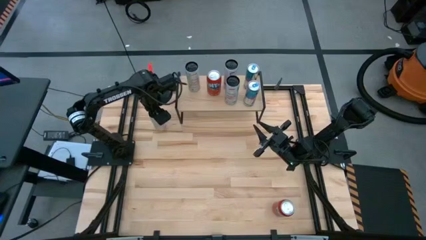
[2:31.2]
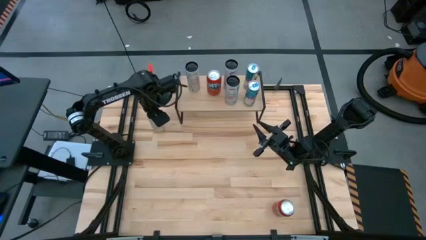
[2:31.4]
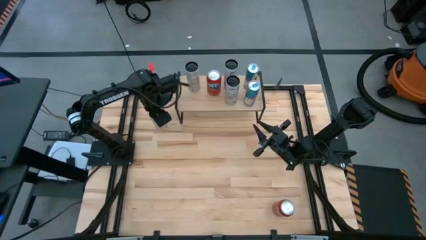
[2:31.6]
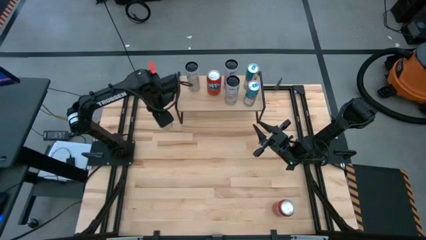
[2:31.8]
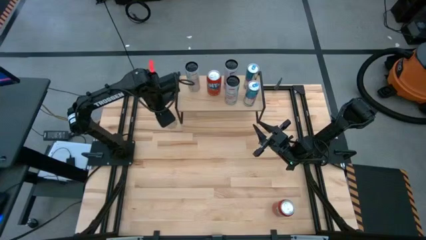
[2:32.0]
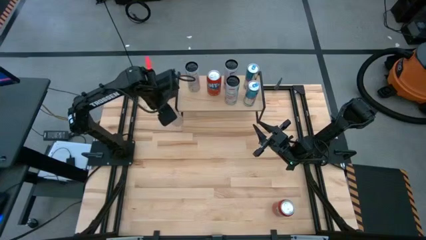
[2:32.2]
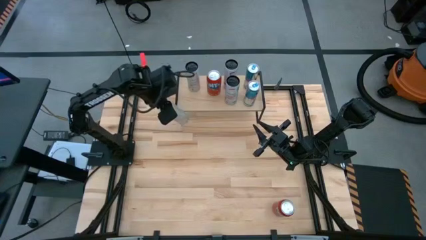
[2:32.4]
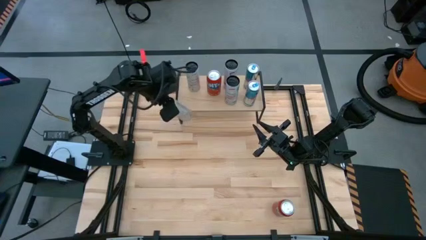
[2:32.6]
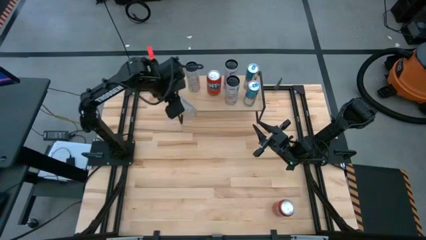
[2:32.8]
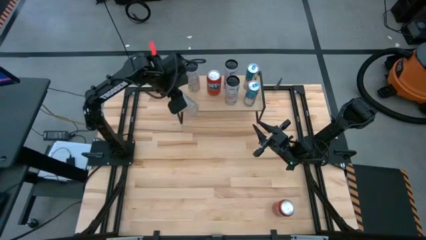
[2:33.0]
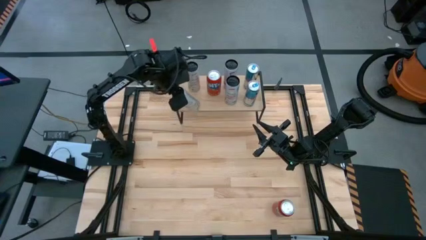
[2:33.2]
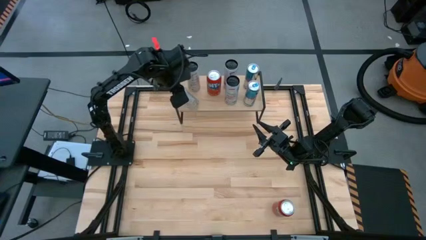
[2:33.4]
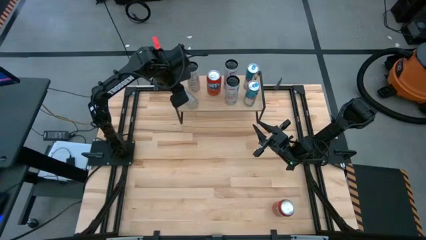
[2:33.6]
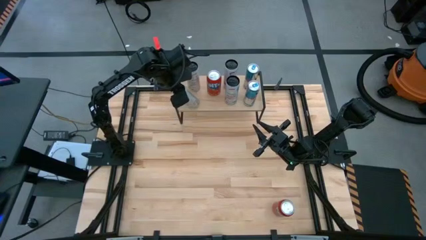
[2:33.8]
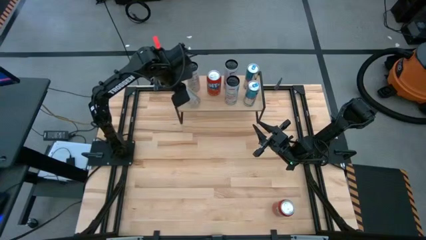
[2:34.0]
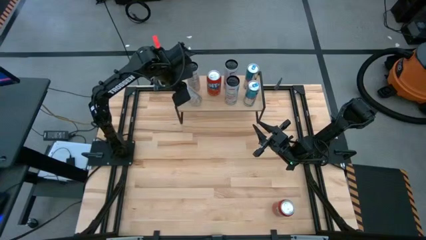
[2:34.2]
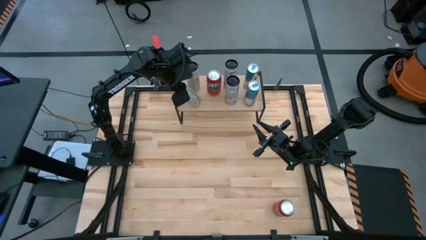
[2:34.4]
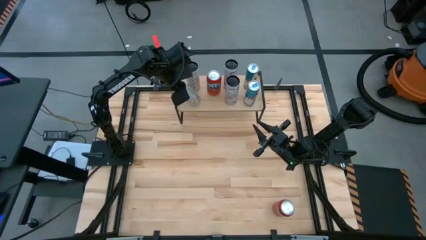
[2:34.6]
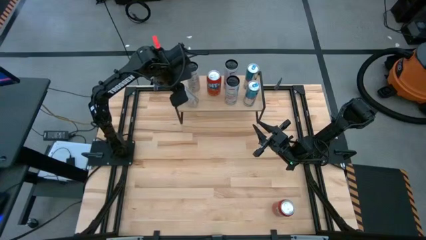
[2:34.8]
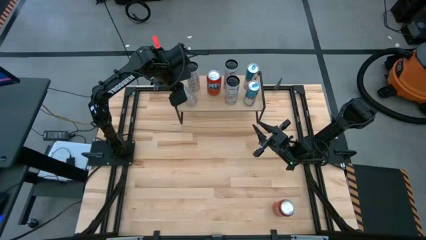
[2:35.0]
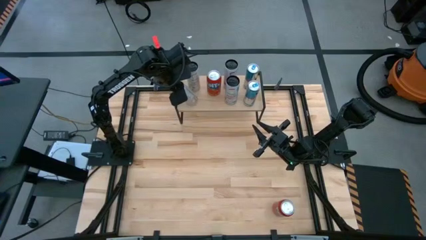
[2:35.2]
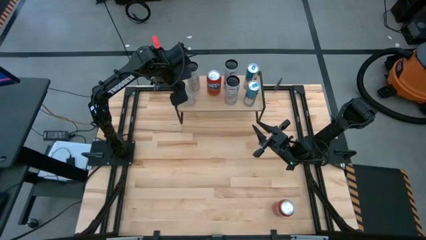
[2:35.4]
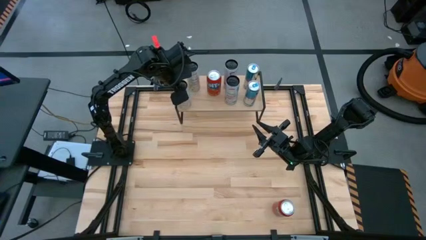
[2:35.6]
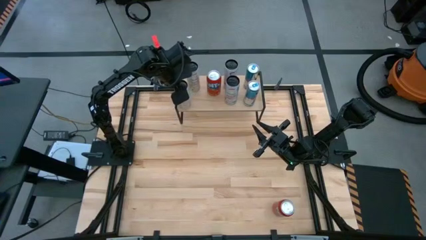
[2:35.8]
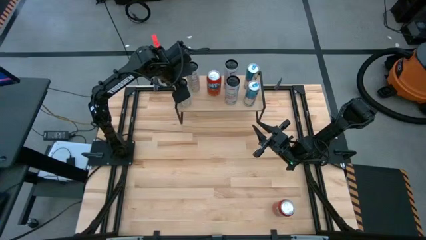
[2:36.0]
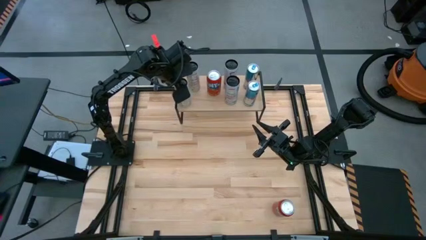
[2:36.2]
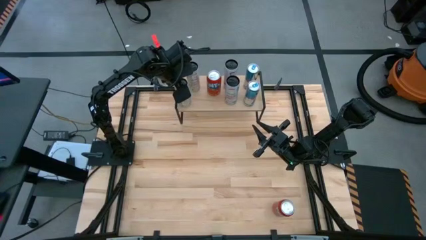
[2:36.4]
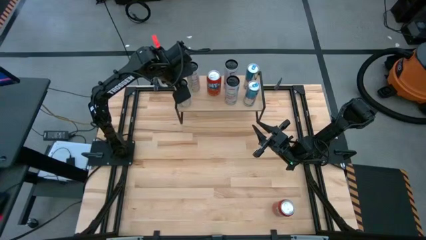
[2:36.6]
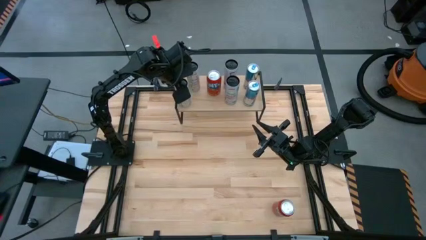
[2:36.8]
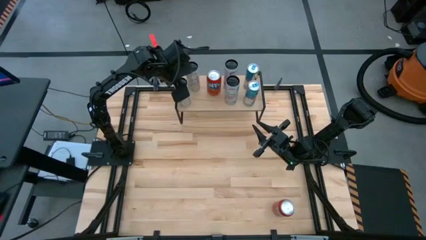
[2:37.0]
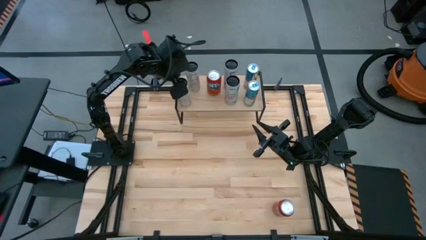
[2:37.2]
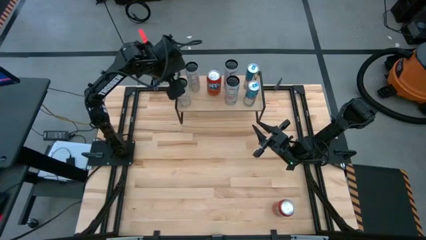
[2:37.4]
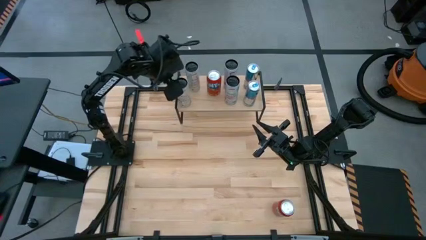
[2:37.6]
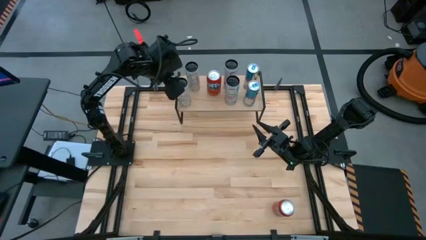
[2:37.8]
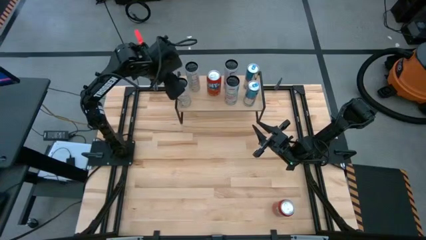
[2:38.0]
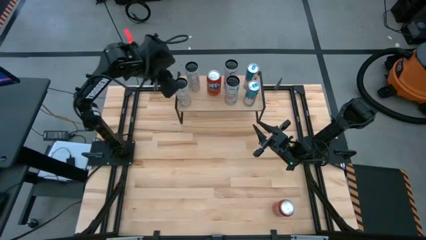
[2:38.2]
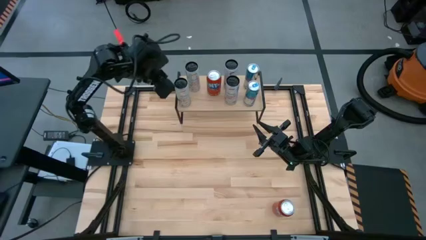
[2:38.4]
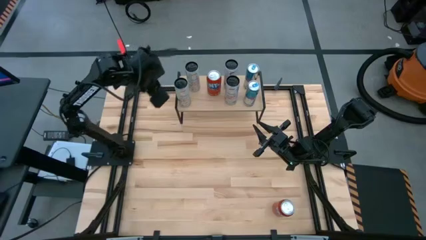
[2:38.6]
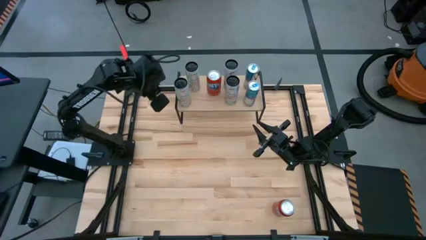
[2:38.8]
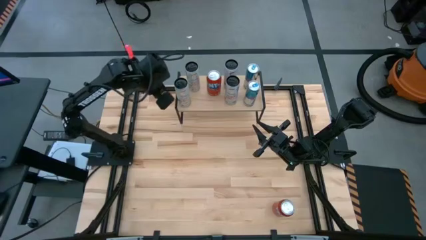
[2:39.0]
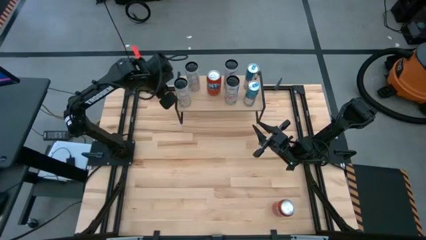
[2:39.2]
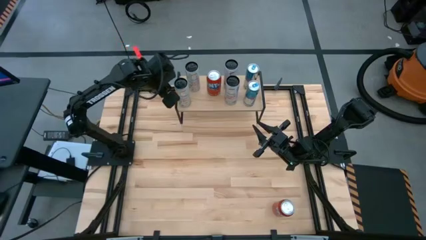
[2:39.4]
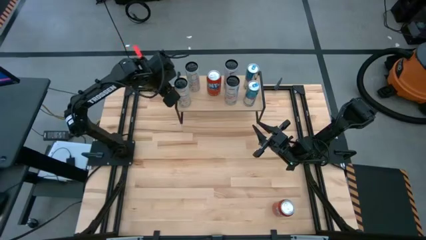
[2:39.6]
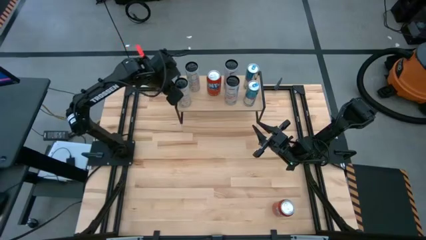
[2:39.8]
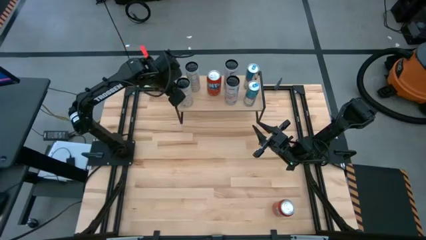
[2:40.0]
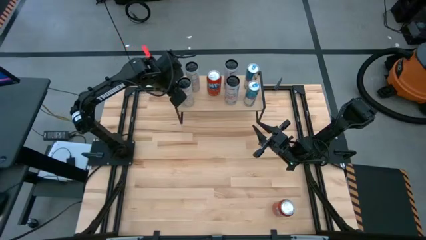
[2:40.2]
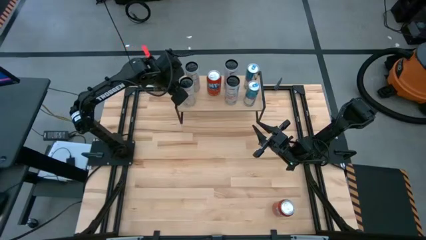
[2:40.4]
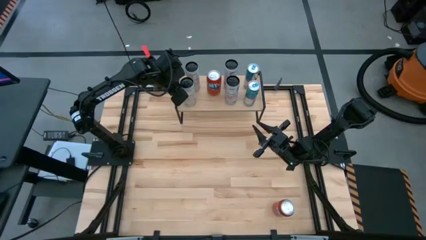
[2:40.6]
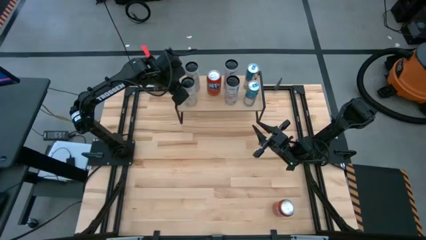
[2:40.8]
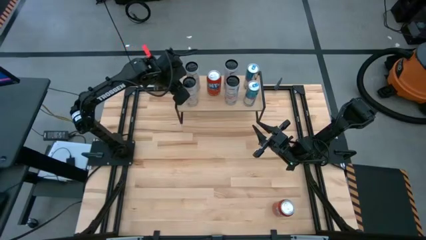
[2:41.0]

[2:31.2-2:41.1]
Task: Place canned beverage on shelf
Put the white yellow soda can on the shelf aligned with the other white yellow soda can

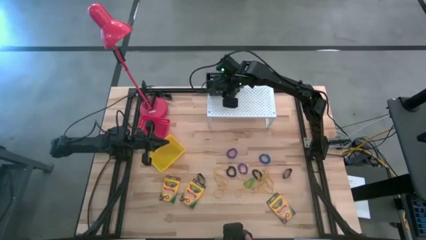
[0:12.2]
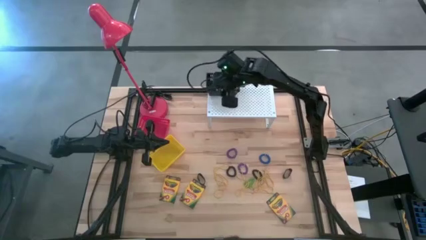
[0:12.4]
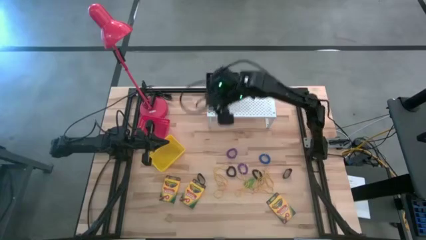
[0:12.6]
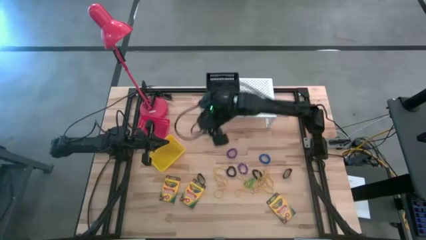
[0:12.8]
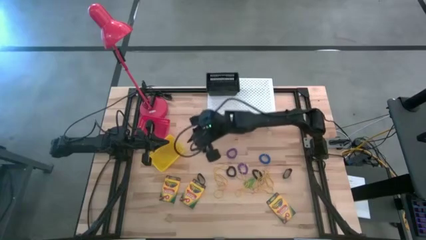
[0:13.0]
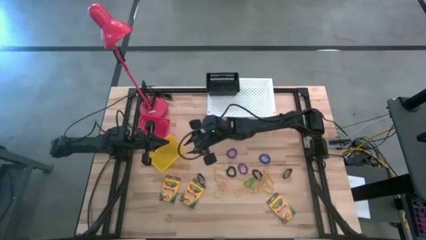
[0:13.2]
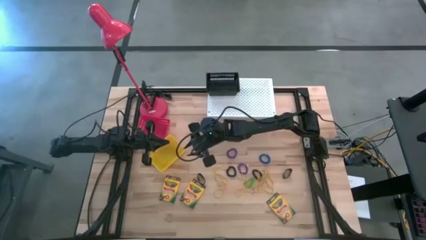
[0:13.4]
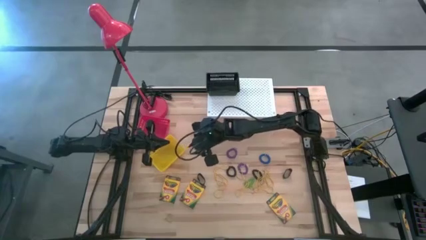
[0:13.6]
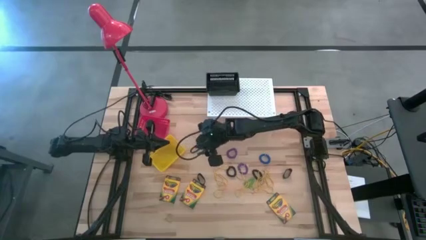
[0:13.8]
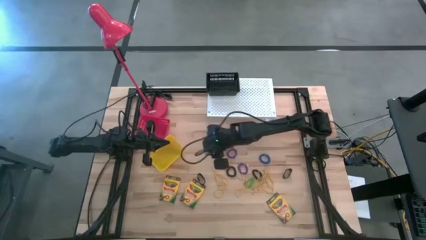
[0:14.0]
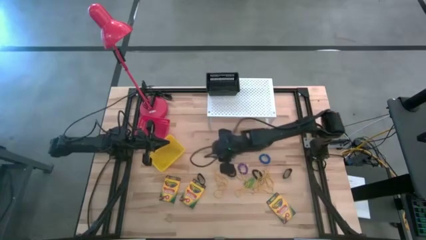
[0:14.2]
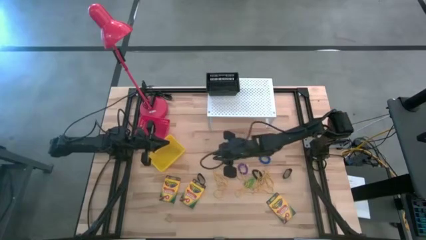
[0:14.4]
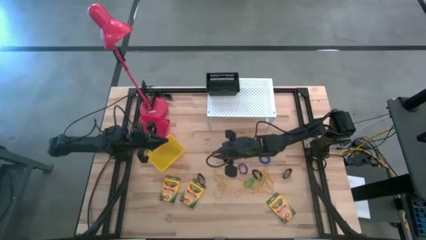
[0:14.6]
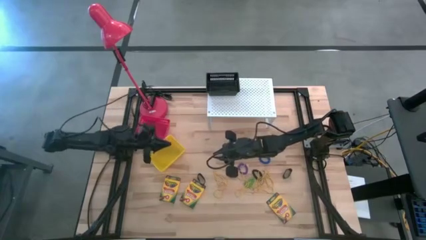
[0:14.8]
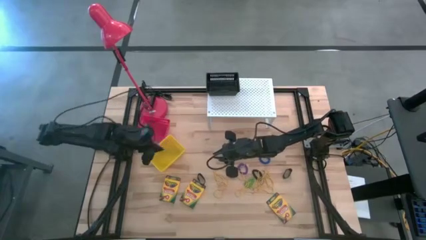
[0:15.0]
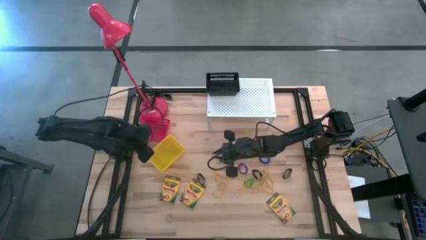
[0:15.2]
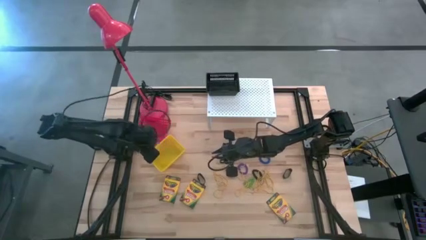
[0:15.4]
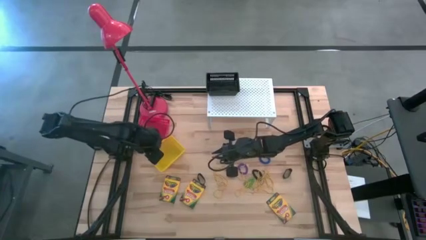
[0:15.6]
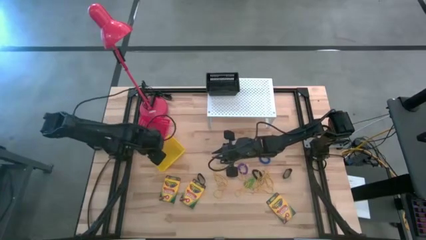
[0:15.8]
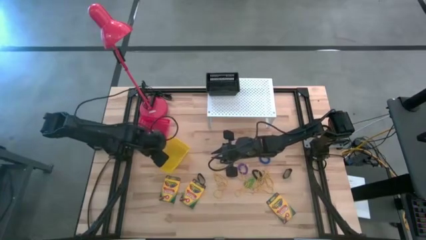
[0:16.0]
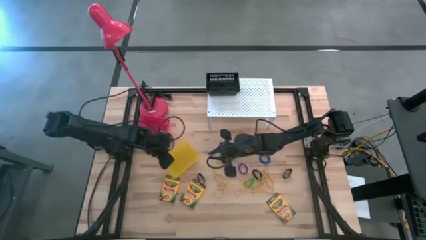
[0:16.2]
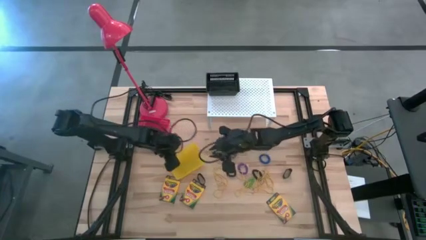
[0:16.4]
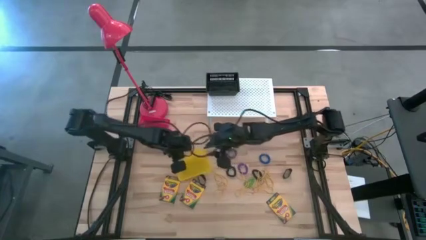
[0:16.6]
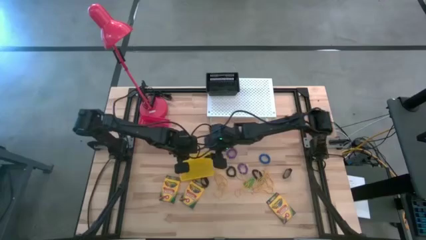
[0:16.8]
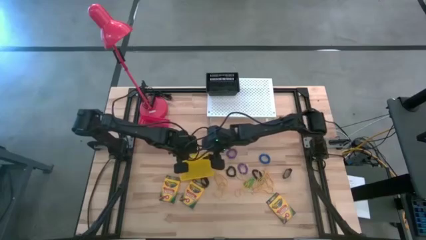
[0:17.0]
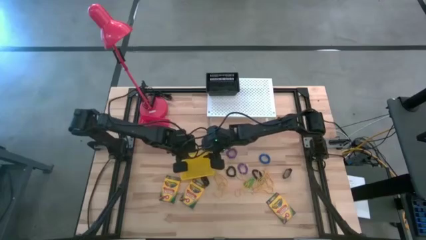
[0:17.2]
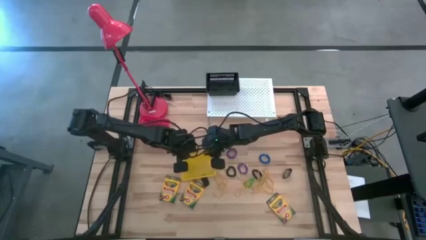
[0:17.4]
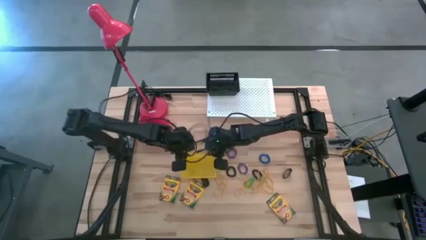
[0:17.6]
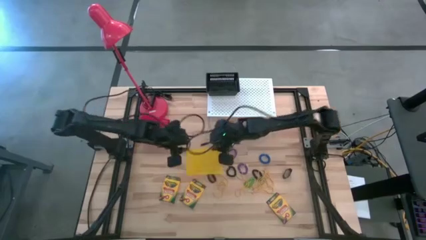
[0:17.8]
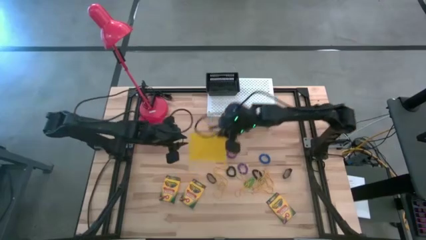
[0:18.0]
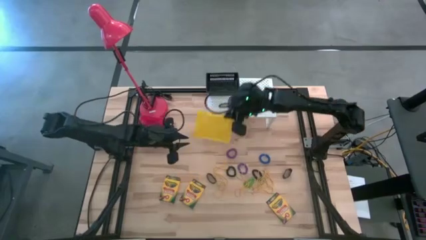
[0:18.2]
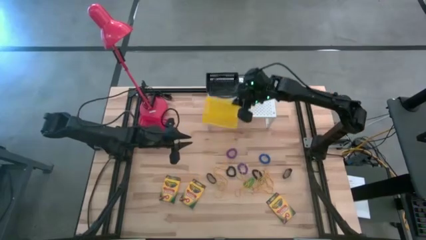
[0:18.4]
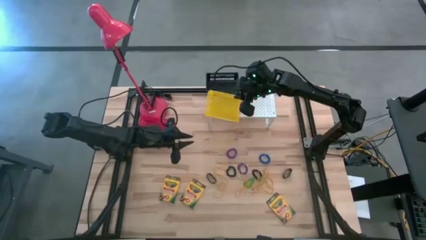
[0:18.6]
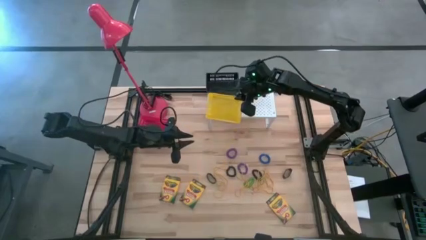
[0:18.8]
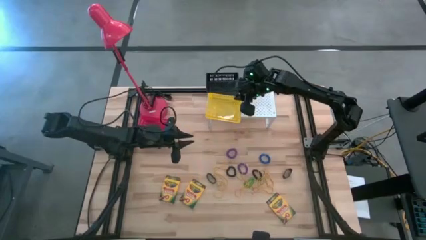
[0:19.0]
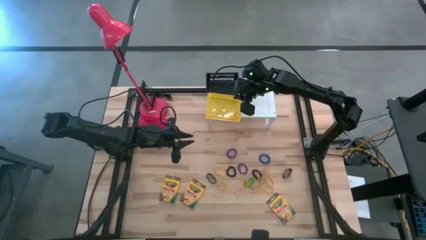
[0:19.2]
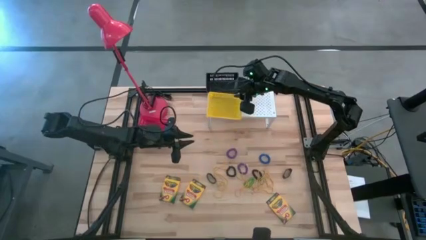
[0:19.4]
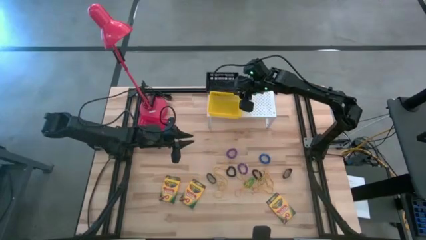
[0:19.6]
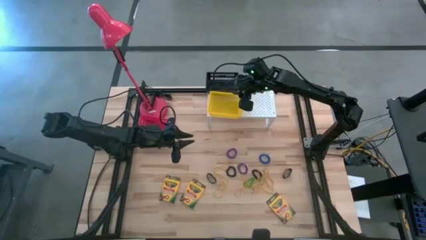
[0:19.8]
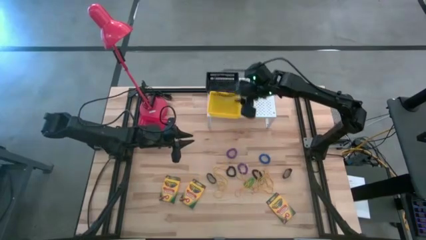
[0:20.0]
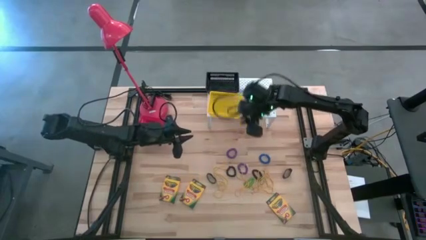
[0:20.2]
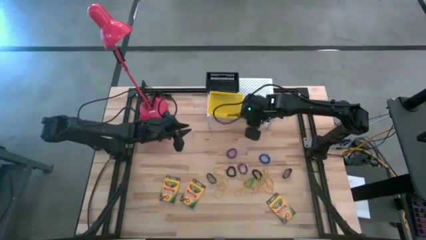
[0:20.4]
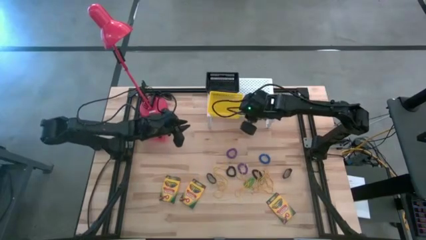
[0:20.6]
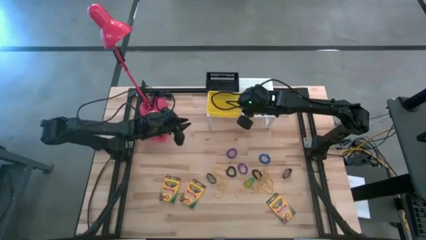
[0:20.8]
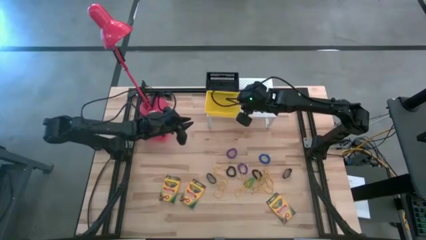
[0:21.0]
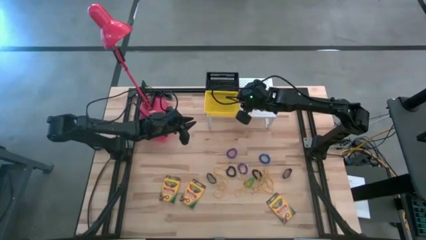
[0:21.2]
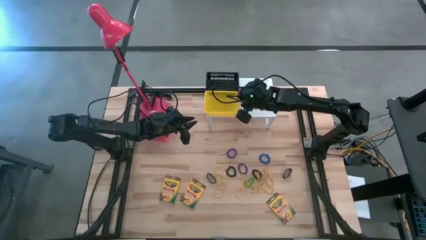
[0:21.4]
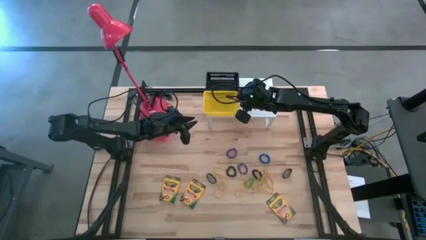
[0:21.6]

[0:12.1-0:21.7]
Task: Pick & Place Office Desk Supplies
Put the yellow bin on the shelf
